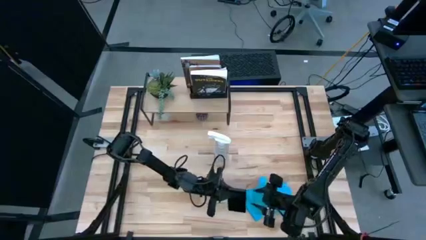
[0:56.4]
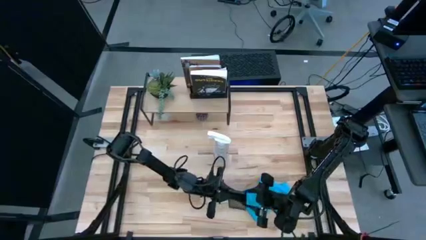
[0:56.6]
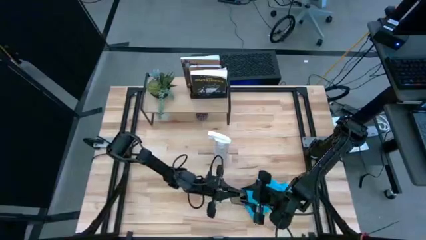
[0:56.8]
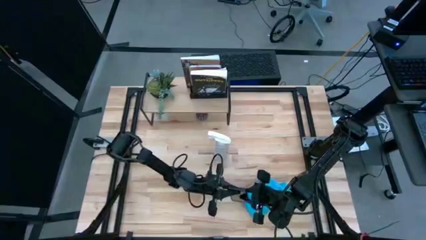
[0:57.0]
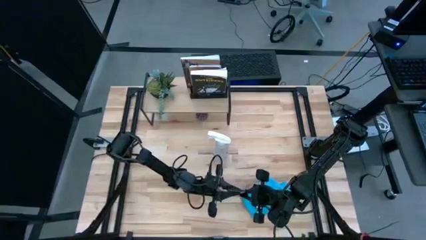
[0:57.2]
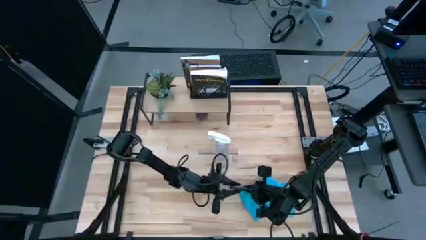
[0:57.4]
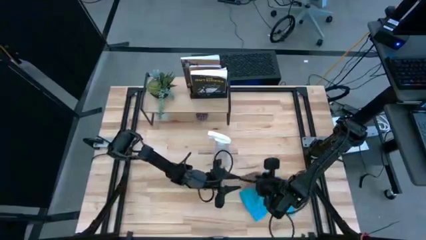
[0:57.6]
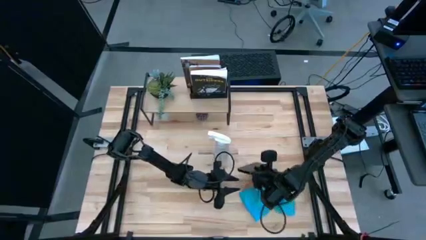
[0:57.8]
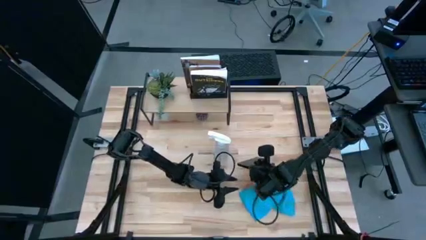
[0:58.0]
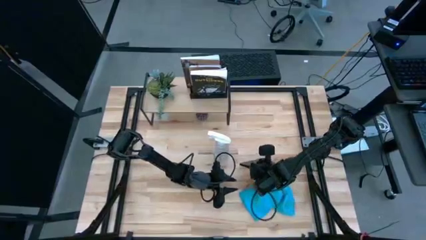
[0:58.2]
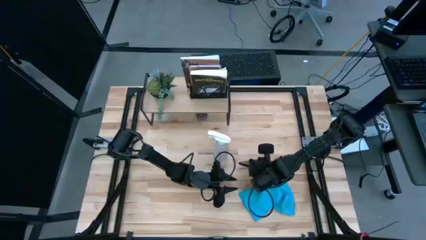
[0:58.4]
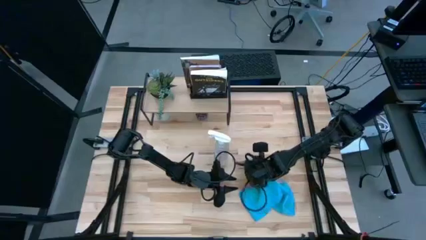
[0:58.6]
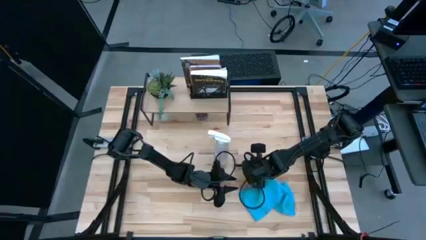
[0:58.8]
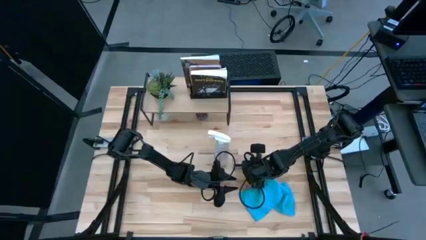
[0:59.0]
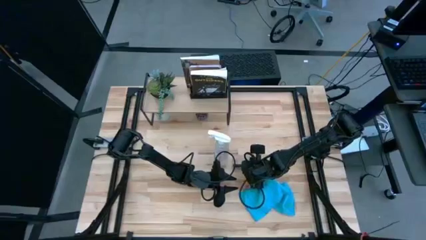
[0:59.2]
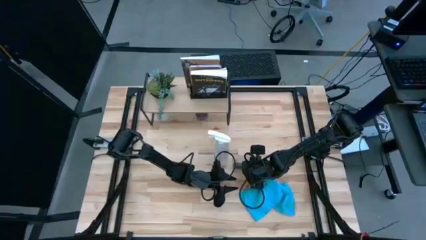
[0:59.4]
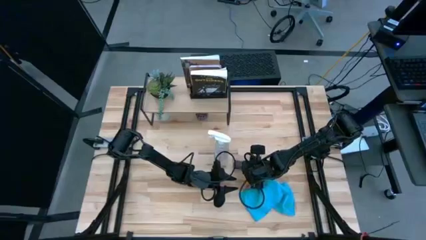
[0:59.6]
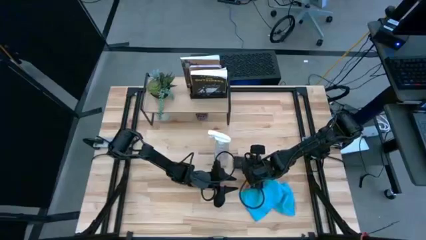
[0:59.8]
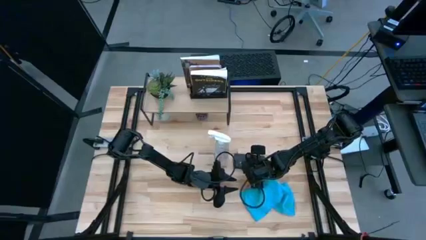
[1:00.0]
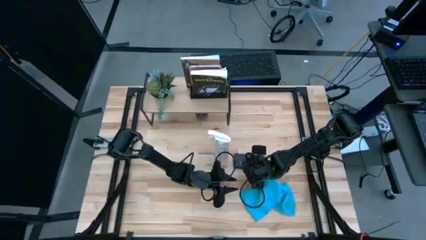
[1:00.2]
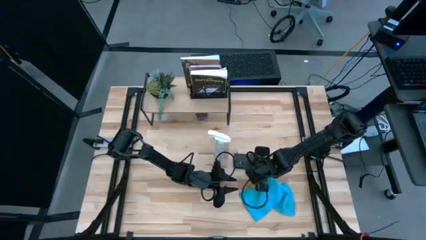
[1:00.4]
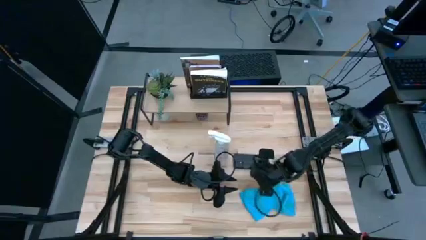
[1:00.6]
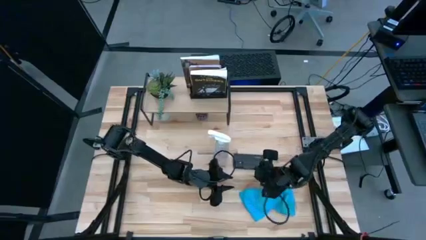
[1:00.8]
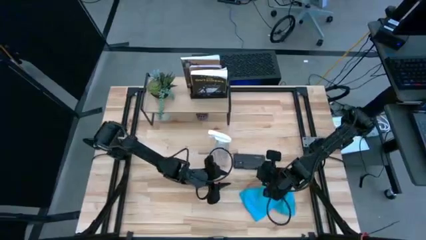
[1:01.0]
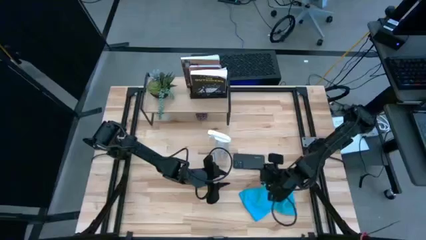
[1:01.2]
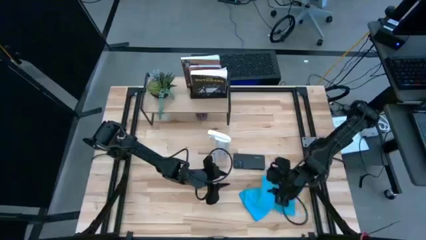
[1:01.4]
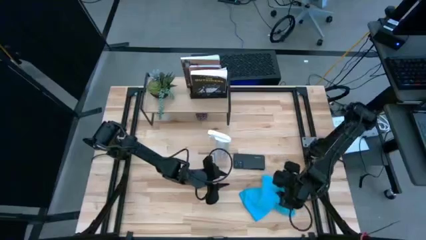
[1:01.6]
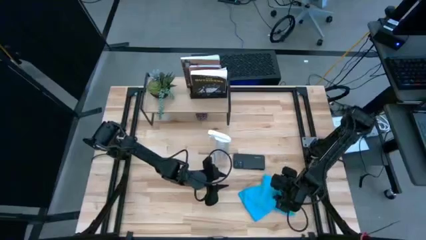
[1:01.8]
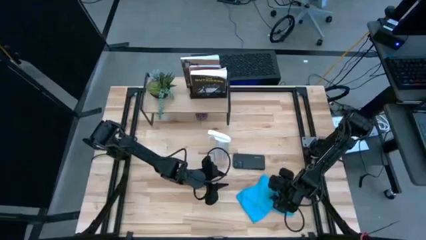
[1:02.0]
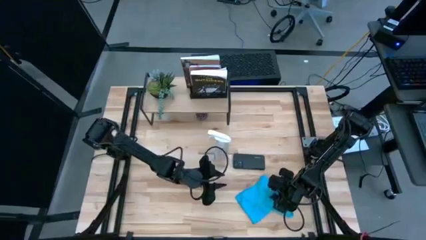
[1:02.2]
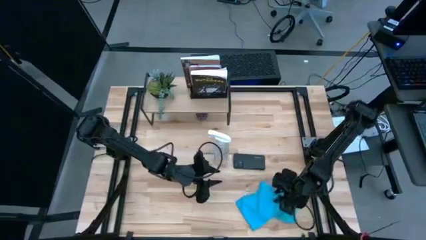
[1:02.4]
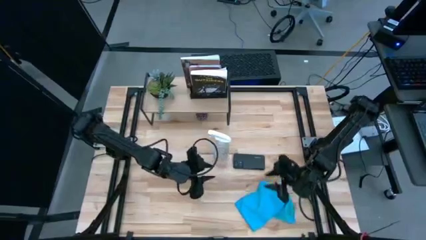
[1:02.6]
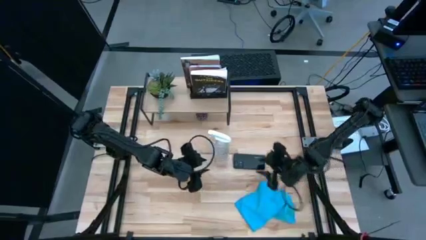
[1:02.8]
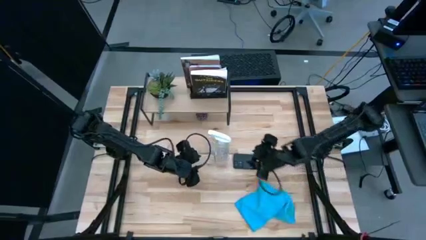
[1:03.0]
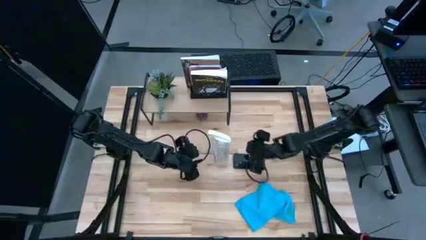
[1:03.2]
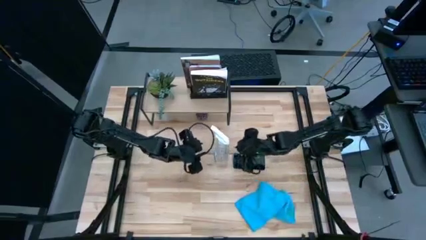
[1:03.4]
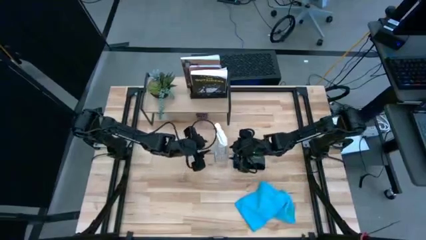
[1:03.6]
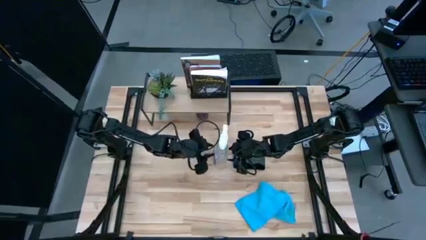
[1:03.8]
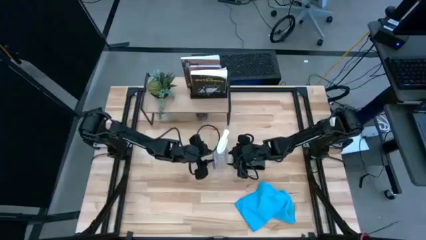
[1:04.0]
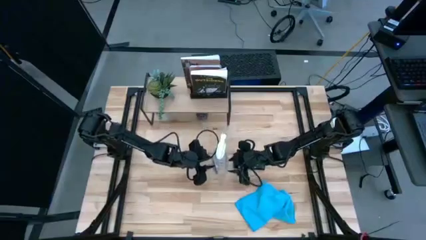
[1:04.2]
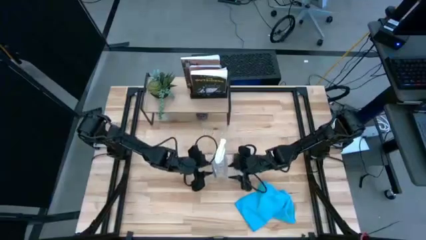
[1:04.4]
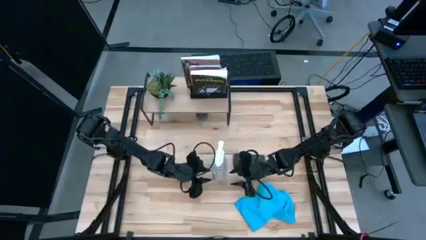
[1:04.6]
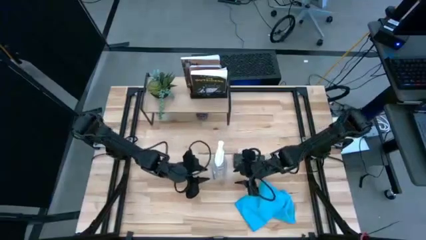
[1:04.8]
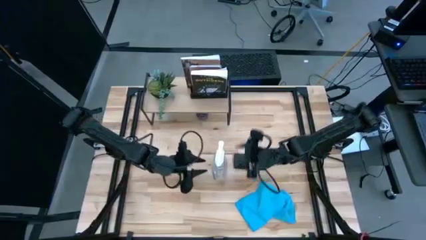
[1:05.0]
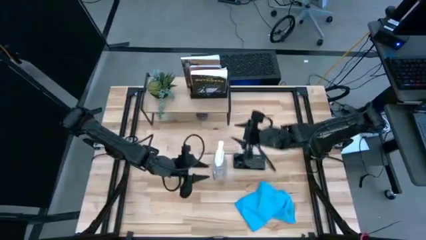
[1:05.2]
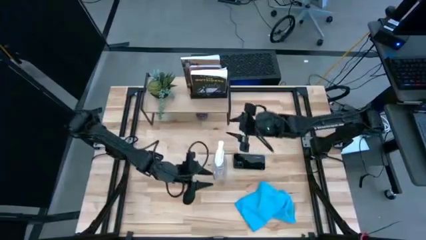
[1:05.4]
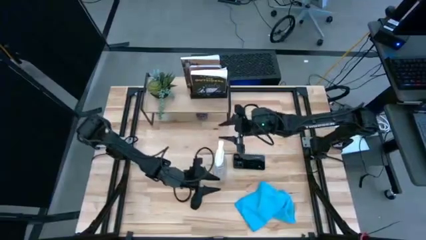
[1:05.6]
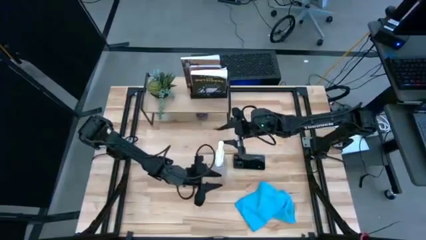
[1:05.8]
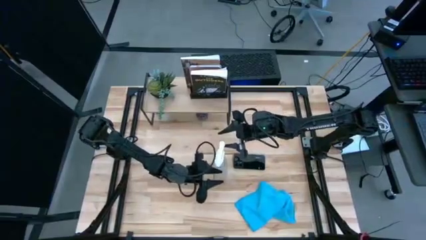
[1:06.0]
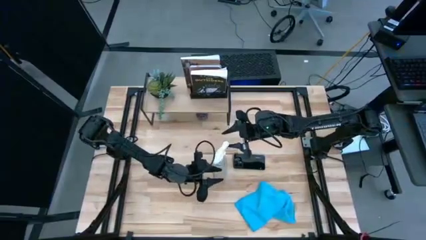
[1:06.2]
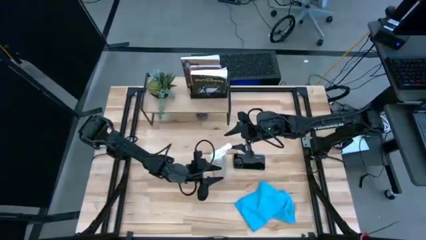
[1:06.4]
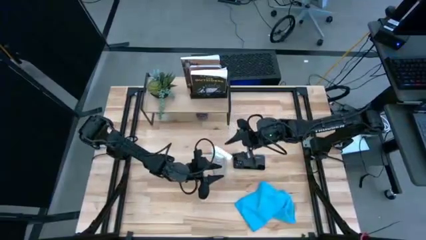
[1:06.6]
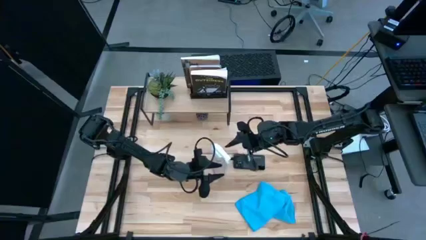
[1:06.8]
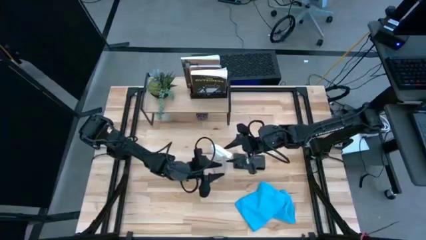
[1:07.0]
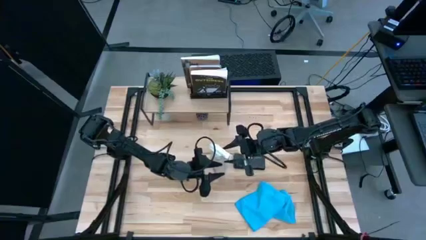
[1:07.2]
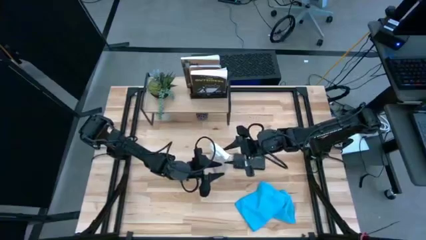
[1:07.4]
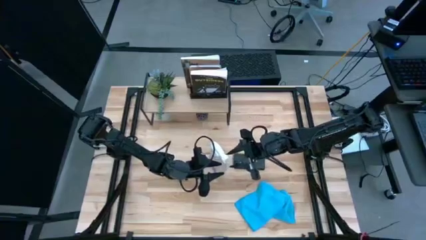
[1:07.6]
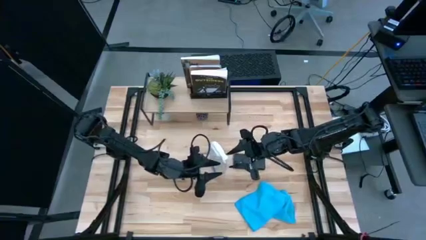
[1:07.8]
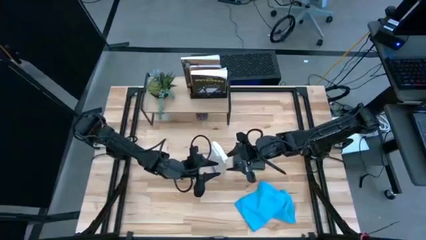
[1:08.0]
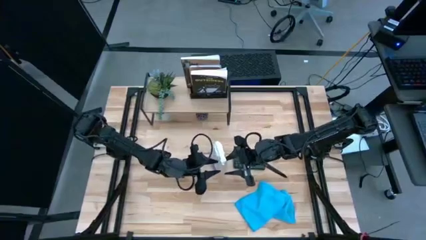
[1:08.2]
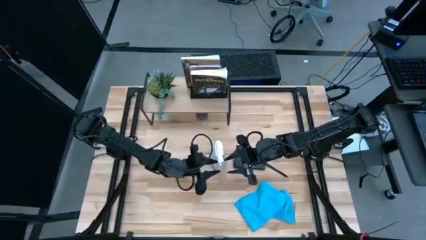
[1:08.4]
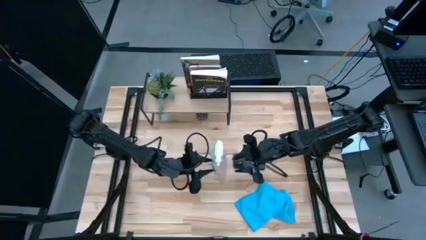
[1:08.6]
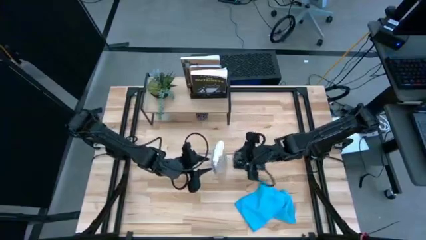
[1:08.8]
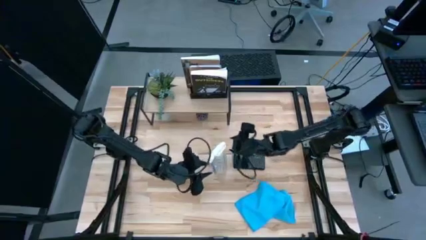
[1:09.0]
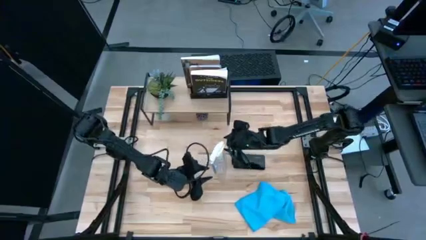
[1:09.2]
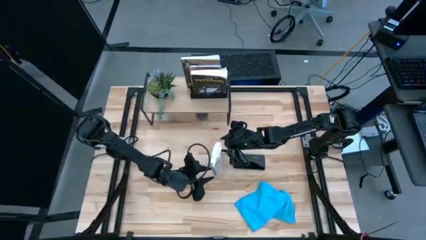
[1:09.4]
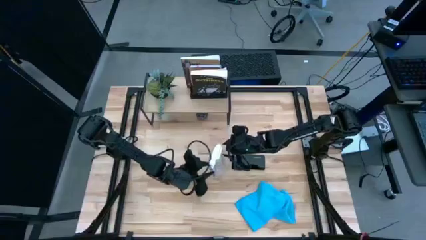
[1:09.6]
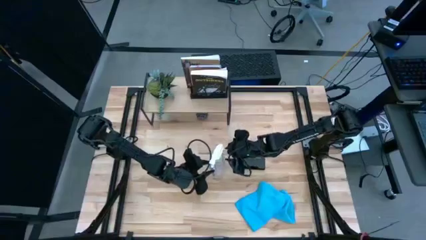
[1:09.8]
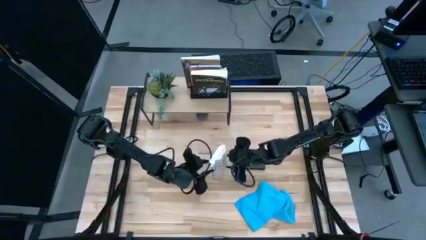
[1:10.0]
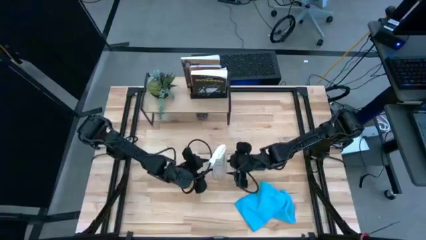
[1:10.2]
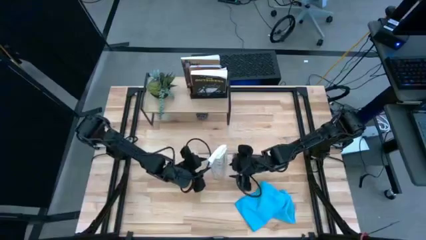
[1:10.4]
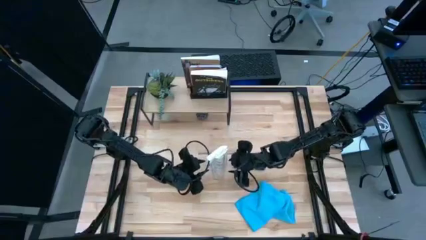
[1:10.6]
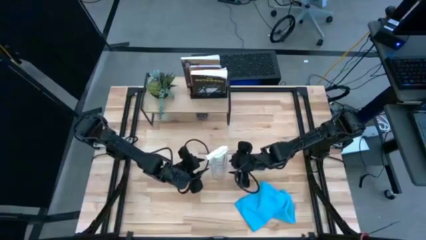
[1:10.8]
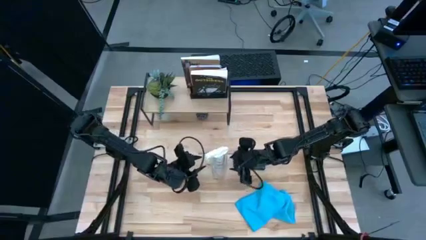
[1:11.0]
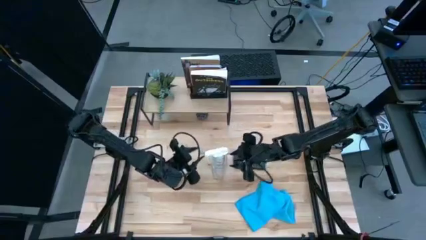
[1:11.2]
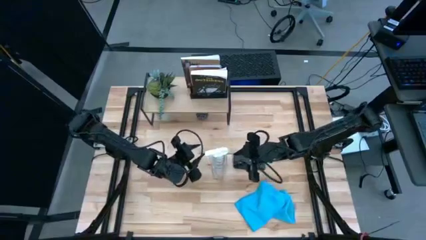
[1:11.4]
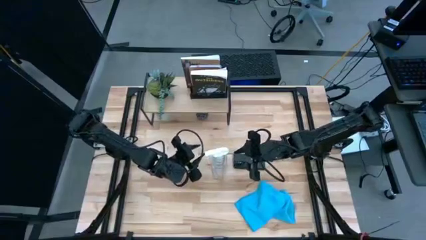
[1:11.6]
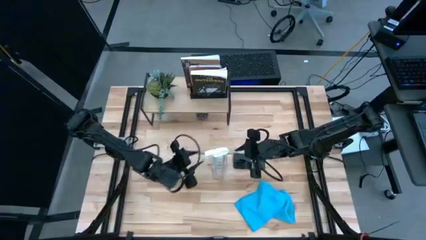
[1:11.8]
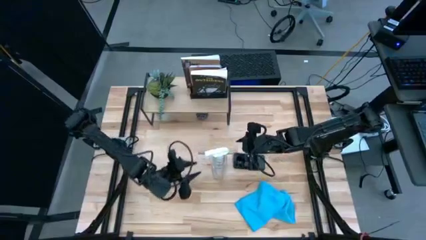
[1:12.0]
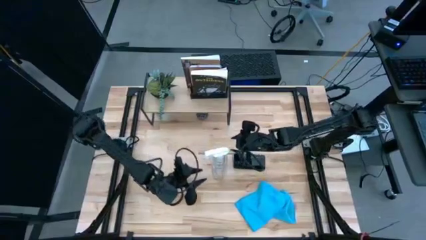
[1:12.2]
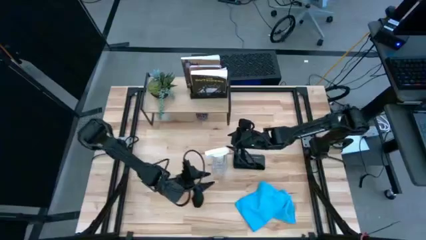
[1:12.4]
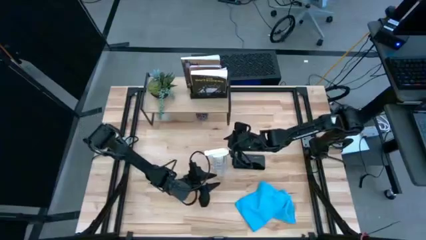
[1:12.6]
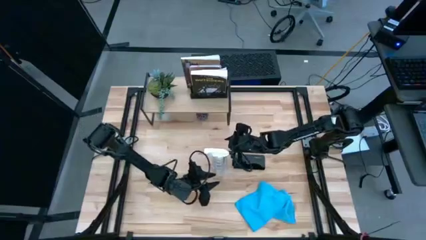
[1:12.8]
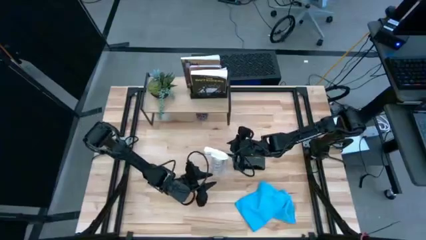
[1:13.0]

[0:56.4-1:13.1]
Task: Apply microfiber cloth
Spray the back of the black cellphone using the transparent spray bottle
